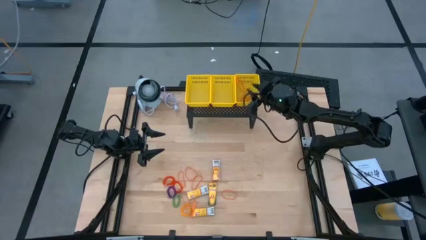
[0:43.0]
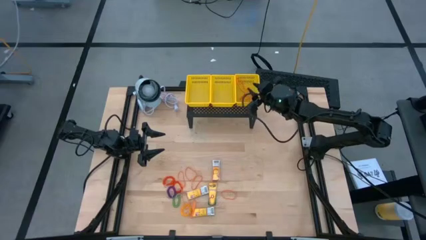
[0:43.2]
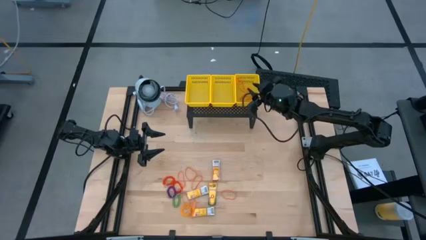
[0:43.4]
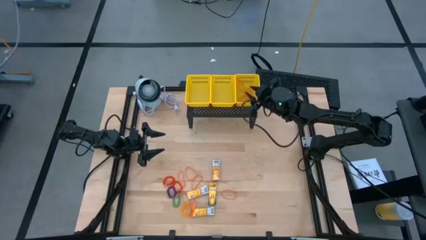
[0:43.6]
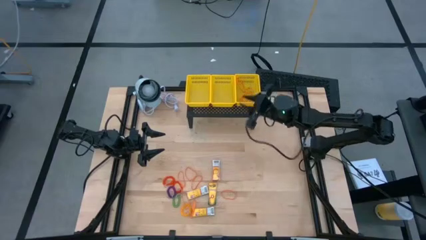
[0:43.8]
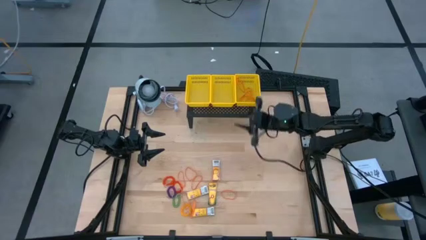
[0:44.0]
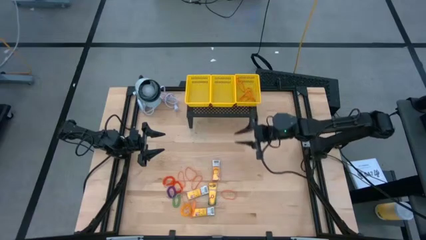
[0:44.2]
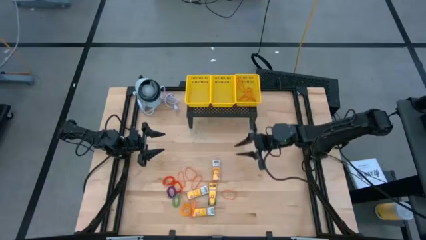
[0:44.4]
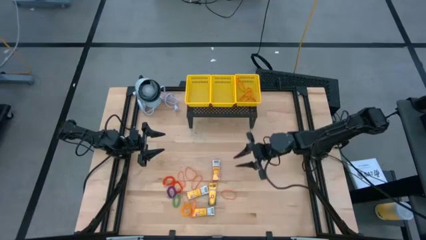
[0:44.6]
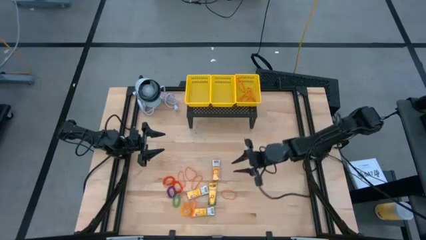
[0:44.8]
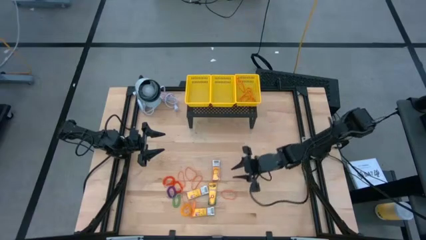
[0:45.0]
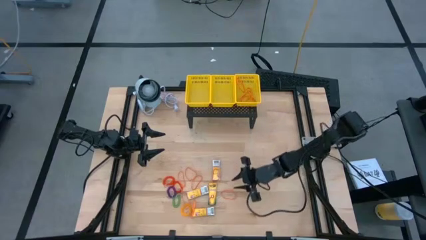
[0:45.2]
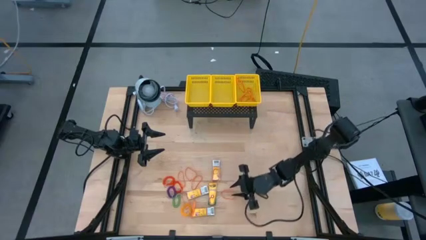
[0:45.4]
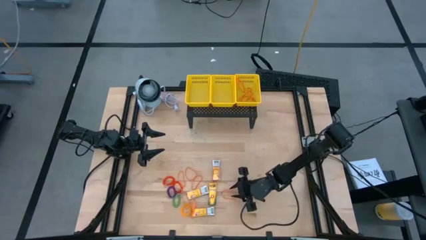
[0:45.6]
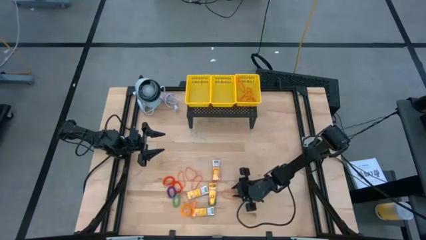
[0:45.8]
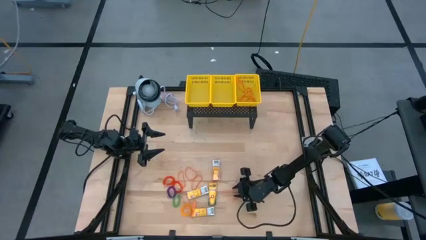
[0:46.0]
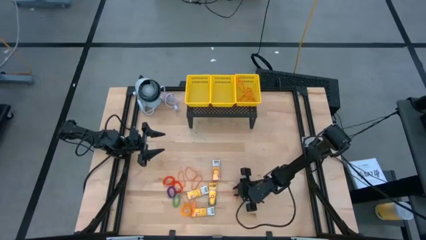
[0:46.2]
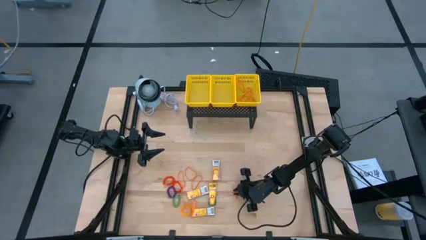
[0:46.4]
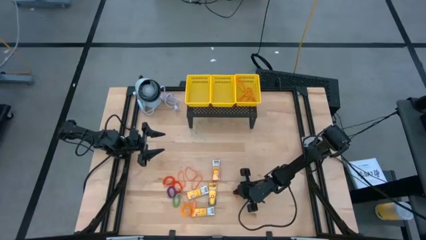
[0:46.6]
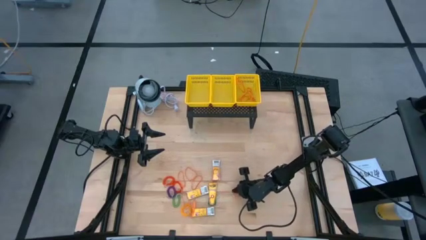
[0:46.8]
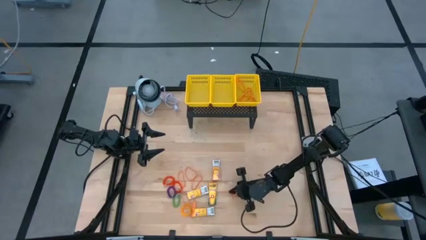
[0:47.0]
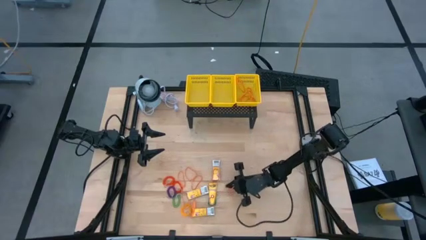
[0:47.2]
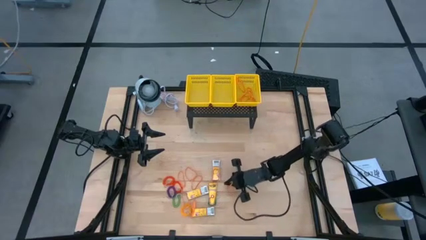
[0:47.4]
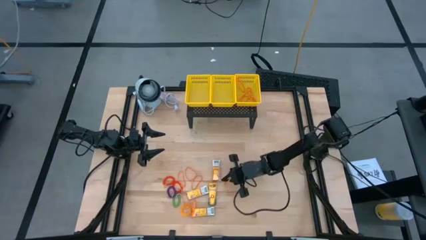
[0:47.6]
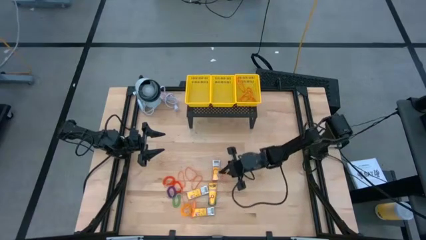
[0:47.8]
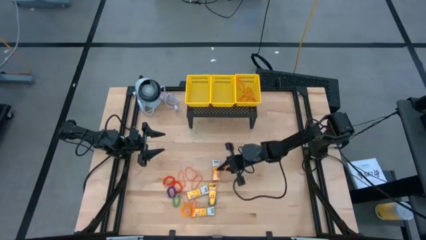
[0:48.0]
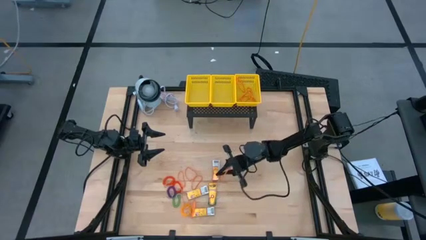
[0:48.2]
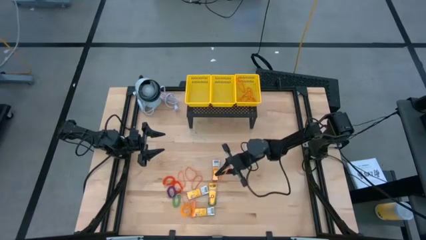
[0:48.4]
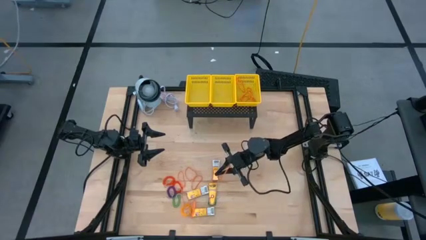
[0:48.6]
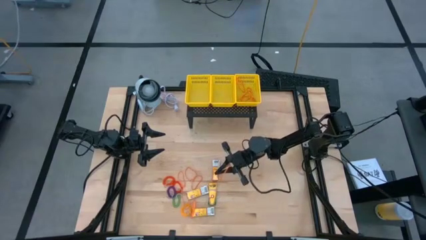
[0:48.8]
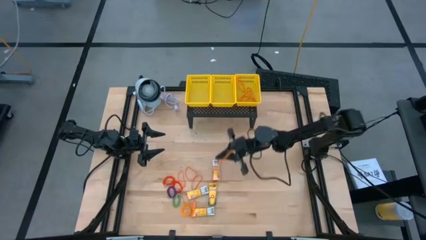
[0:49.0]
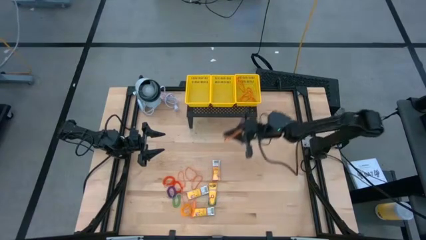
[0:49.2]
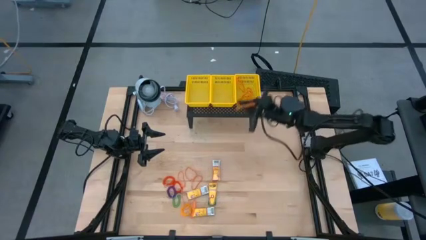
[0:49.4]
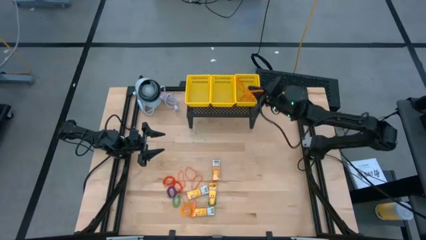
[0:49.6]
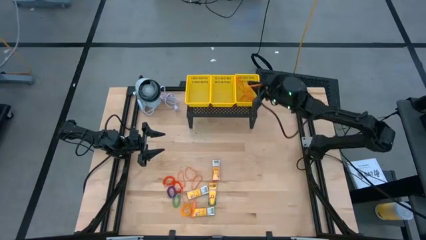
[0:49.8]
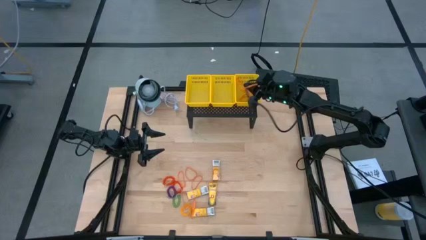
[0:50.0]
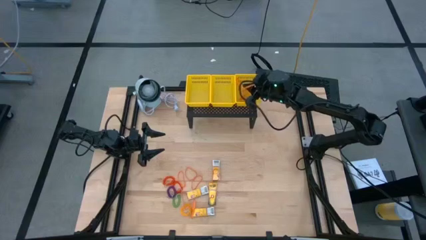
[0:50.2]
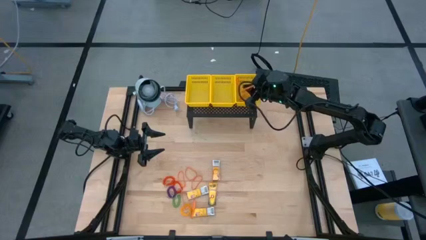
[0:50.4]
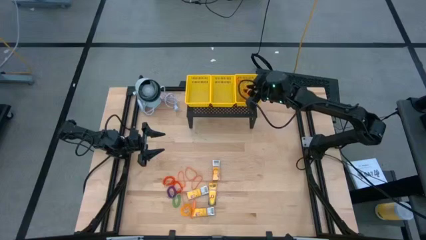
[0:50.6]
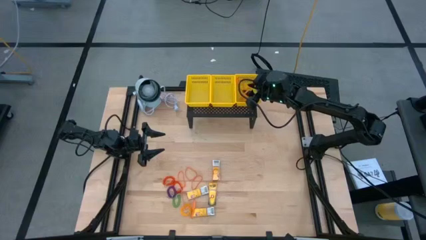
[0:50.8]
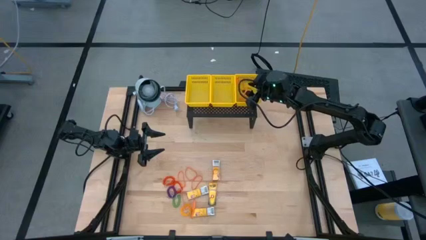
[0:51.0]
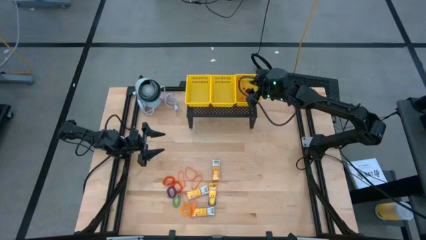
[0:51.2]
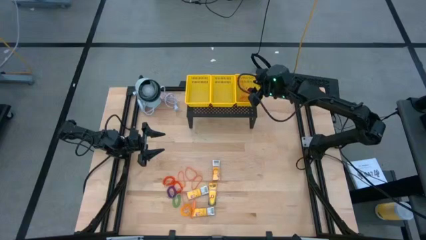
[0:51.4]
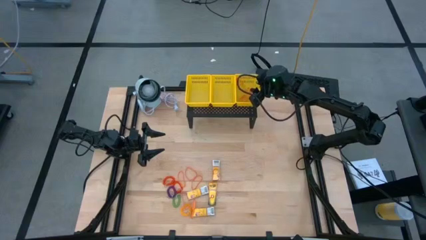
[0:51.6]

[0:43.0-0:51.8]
Task: Pick & Place Office Desk Supplies
Put the orange rubber band into the right yellow bin on the shelf

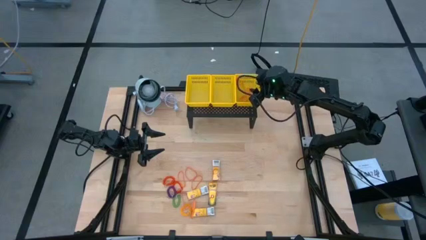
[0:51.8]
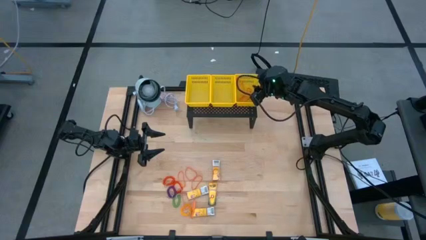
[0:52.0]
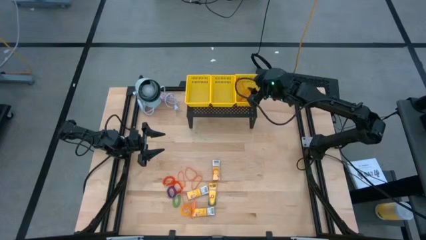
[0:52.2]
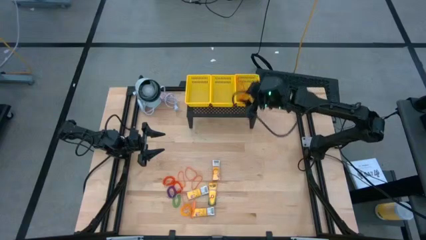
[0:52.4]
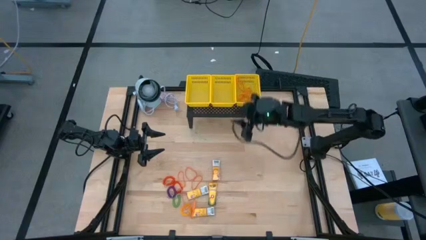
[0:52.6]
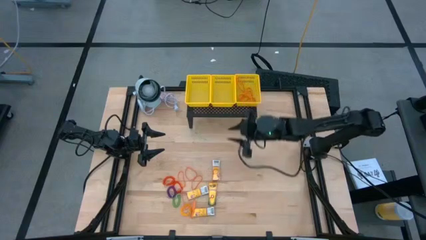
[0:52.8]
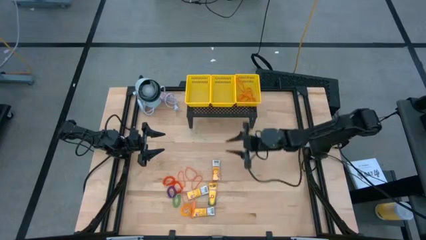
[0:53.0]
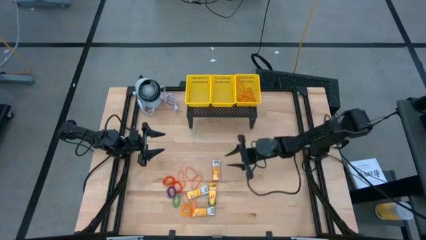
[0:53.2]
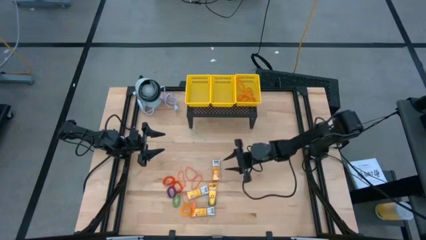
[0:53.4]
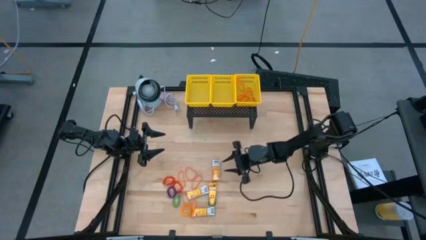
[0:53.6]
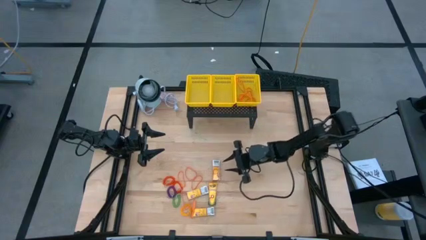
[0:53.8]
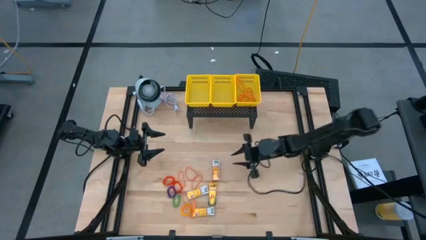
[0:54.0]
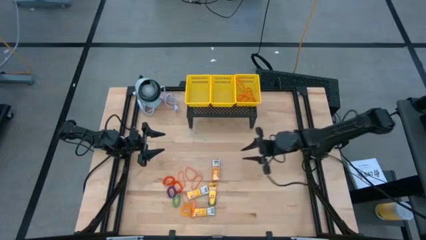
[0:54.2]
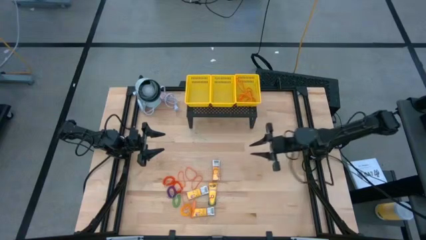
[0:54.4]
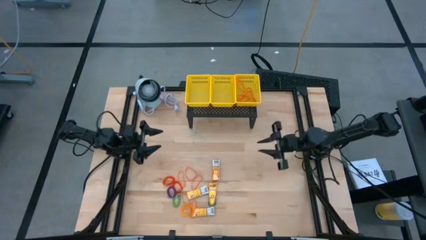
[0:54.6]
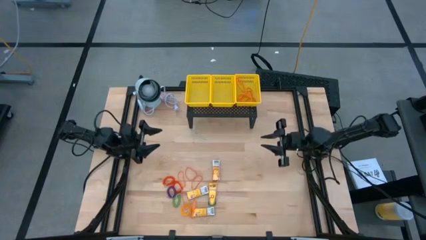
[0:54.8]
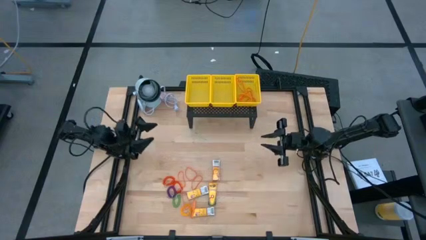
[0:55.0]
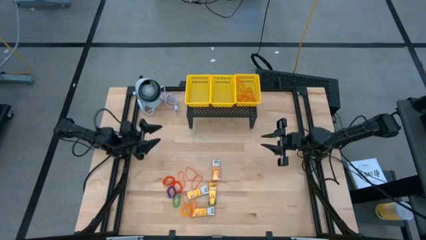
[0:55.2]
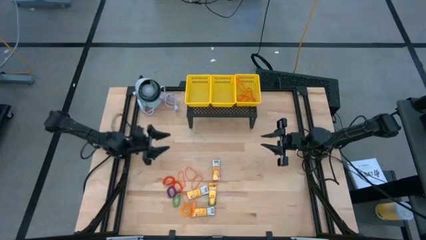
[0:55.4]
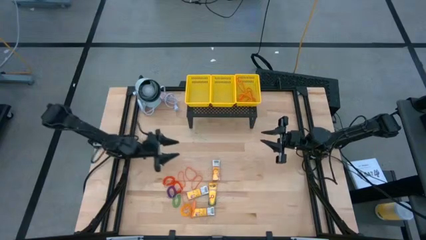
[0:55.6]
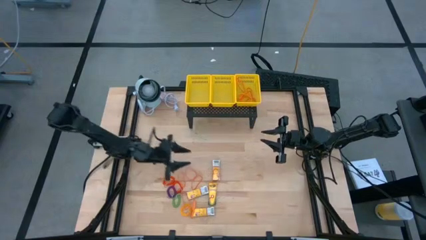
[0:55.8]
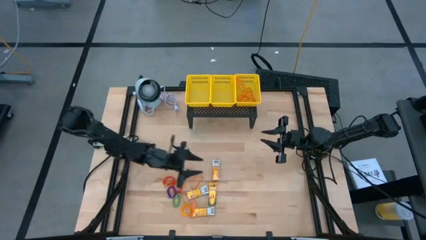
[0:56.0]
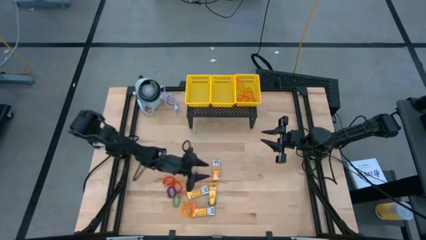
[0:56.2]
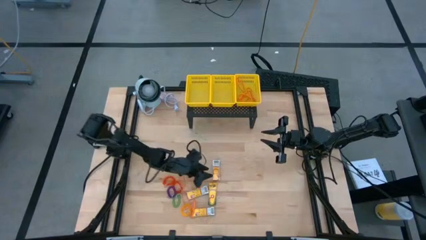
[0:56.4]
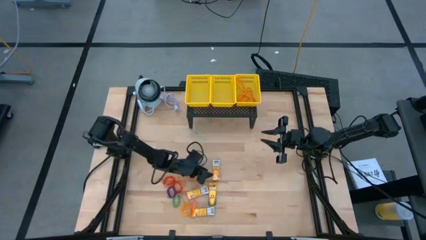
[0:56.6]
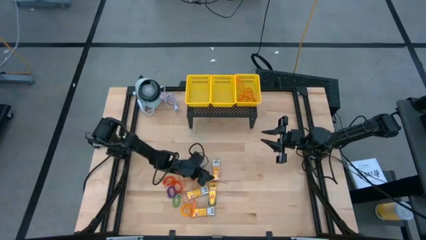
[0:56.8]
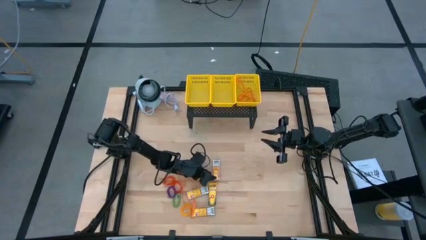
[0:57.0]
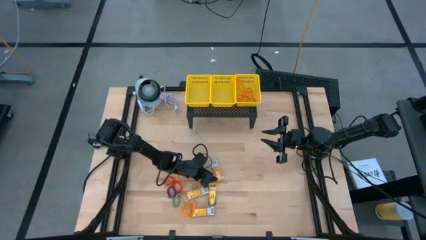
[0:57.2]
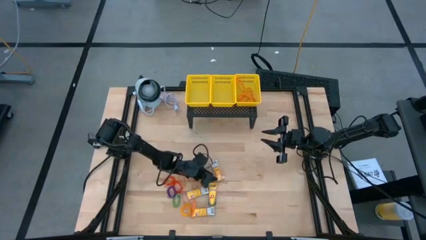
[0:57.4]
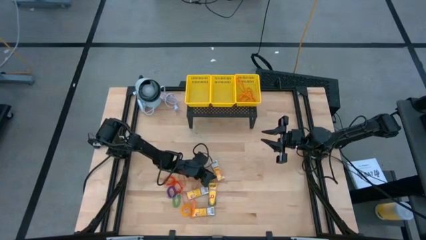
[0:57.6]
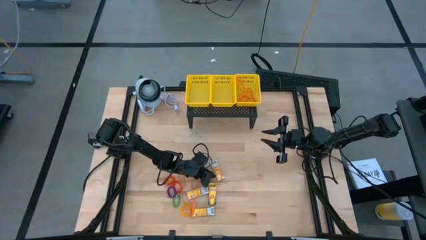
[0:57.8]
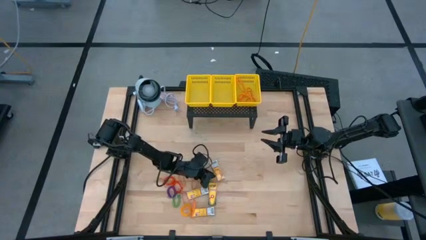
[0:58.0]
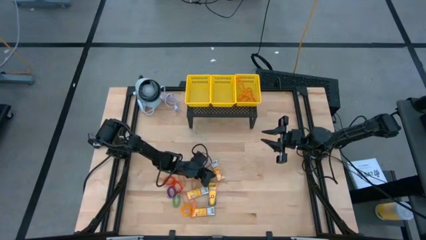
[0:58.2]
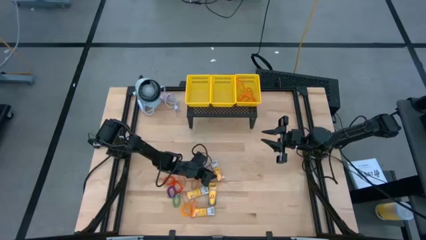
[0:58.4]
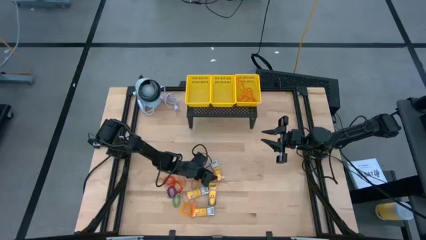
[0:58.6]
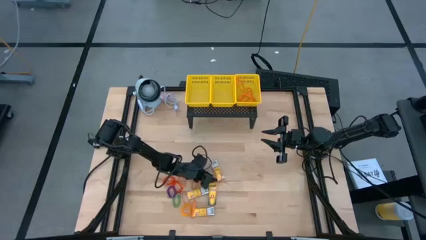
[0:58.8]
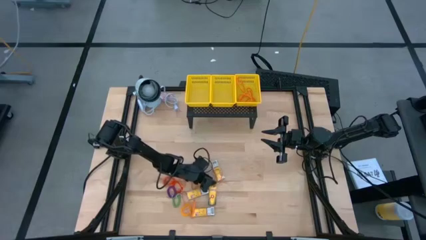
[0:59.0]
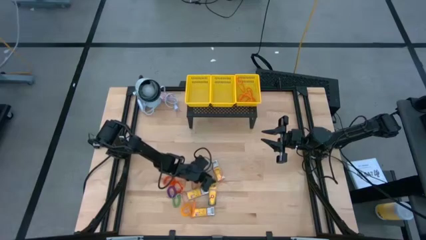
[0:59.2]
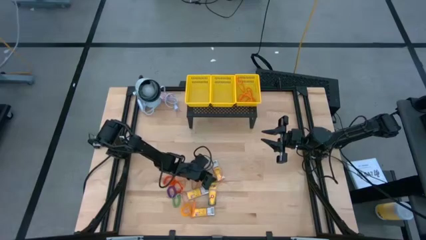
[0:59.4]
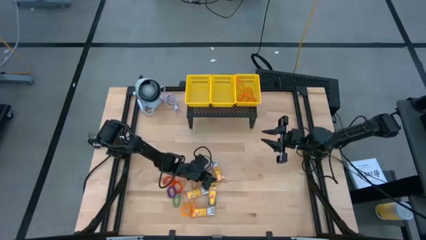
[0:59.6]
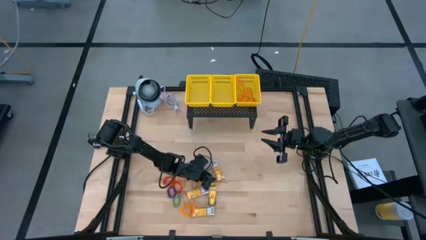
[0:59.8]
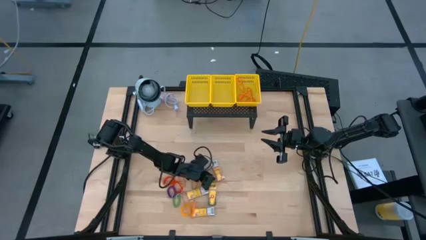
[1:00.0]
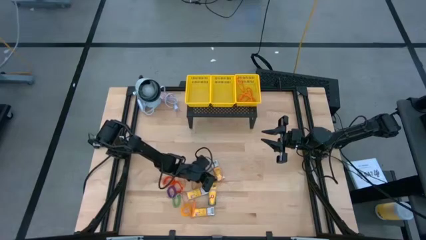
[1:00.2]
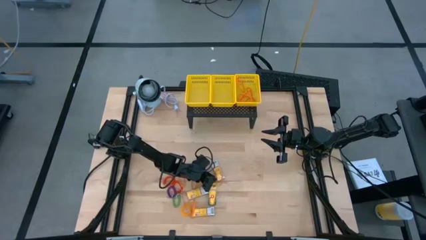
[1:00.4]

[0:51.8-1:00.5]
Put the orange rubber band into the right yellow bin on the shelf
